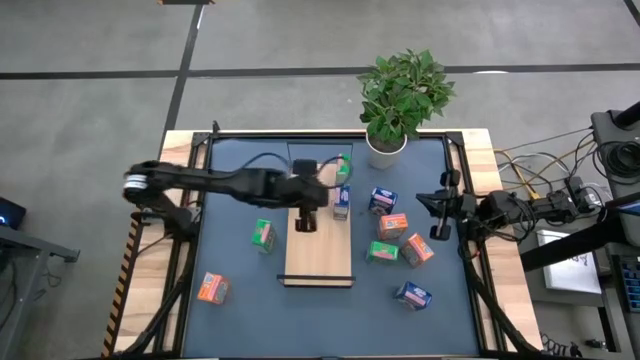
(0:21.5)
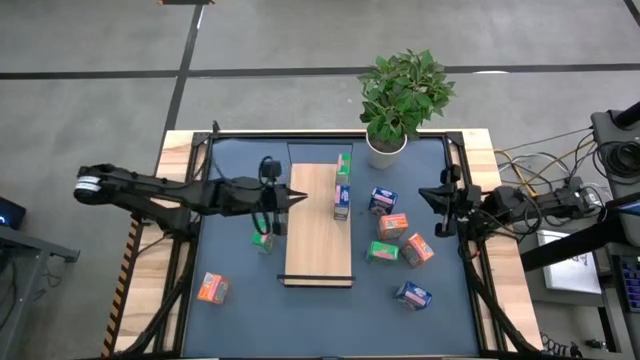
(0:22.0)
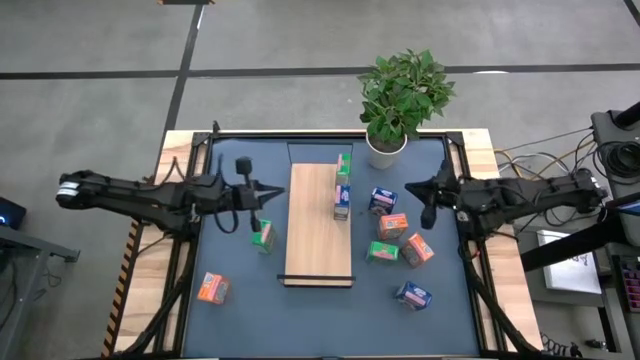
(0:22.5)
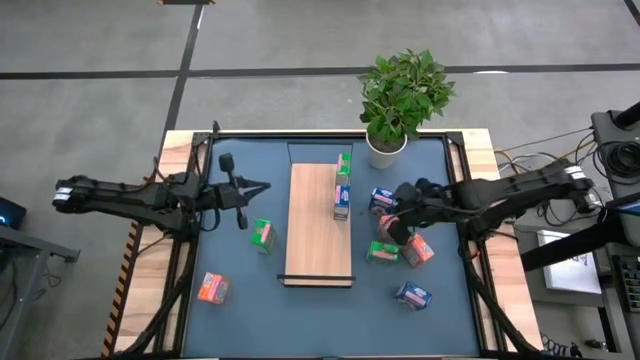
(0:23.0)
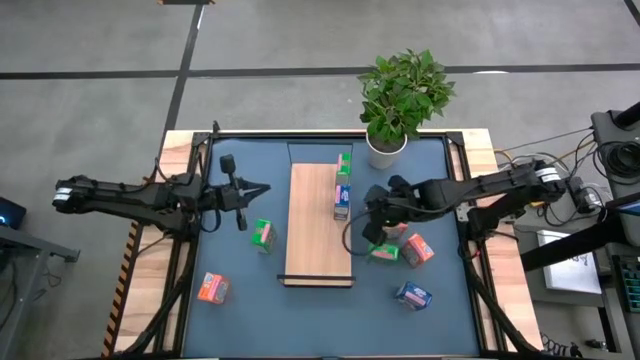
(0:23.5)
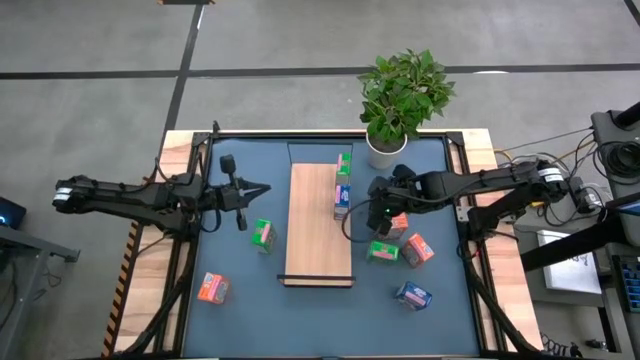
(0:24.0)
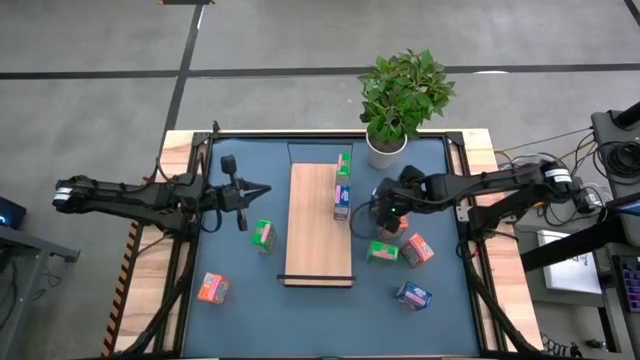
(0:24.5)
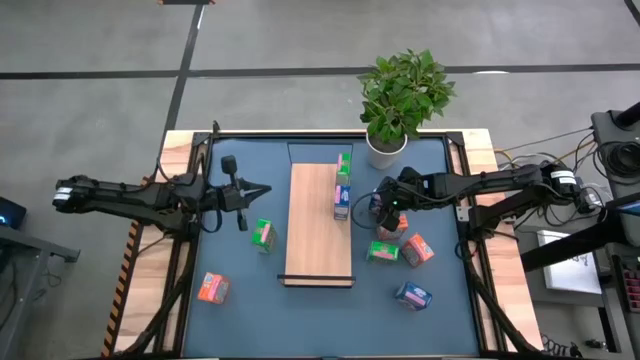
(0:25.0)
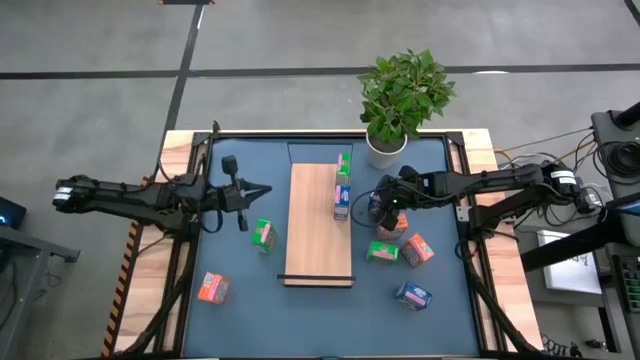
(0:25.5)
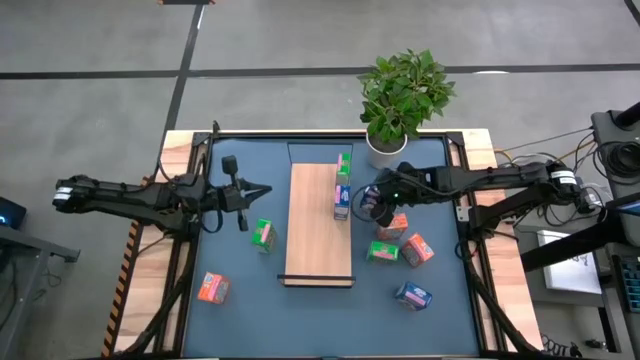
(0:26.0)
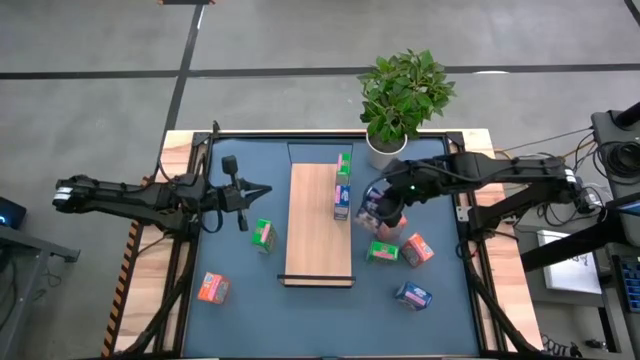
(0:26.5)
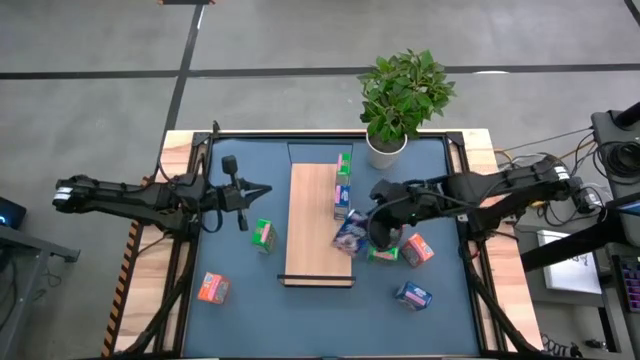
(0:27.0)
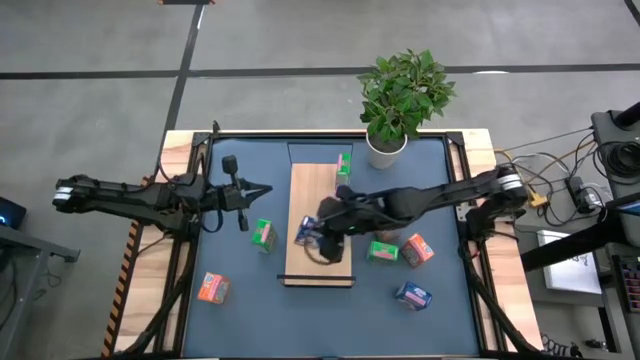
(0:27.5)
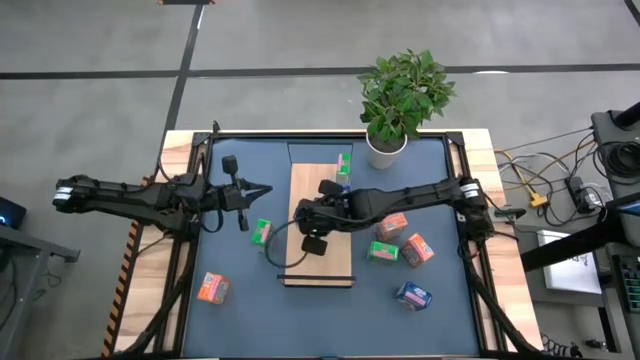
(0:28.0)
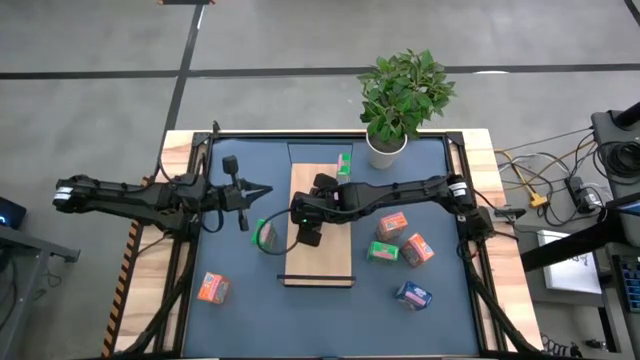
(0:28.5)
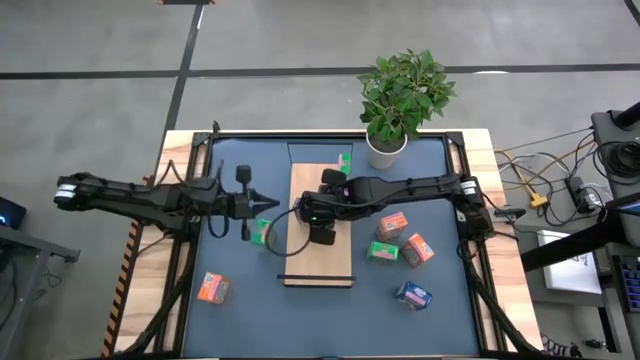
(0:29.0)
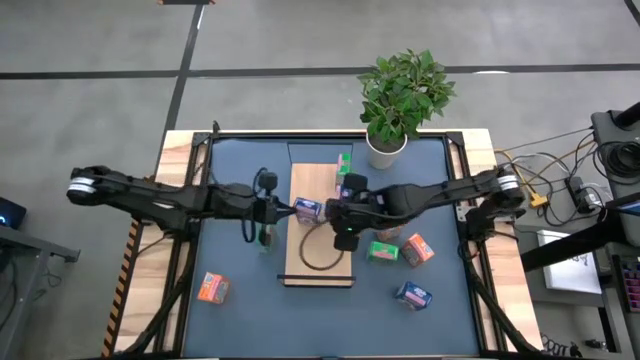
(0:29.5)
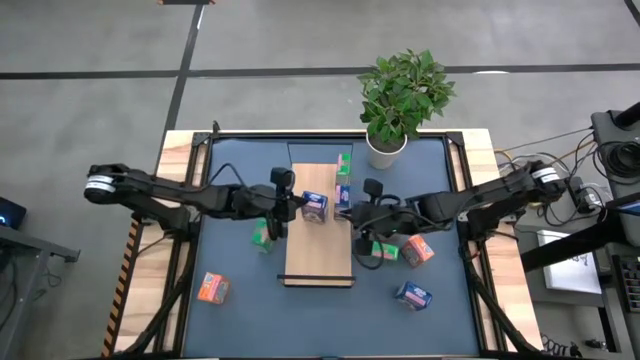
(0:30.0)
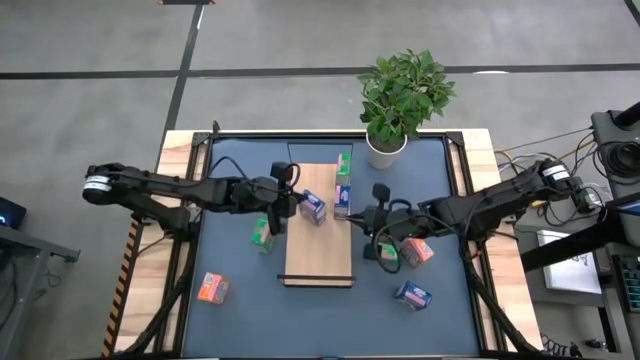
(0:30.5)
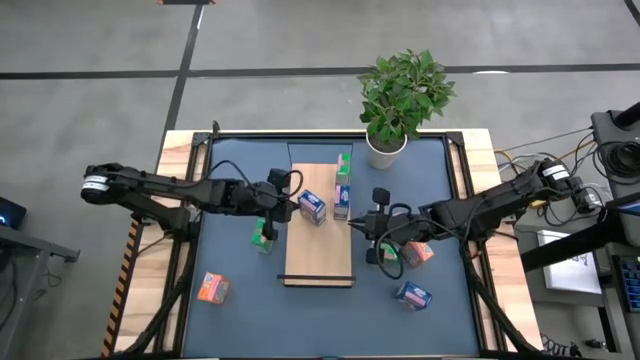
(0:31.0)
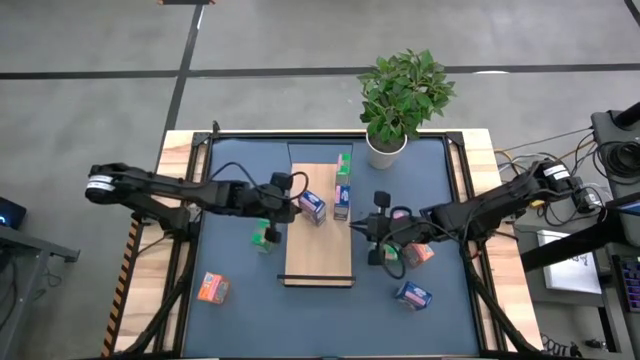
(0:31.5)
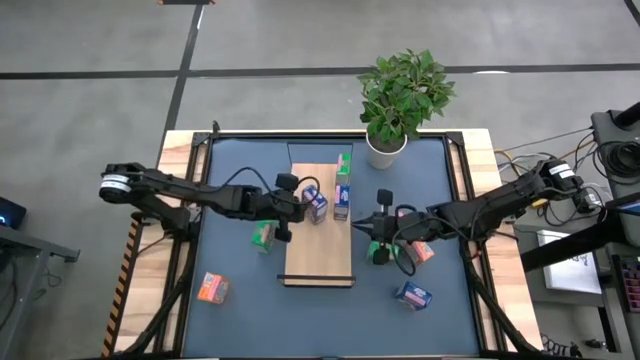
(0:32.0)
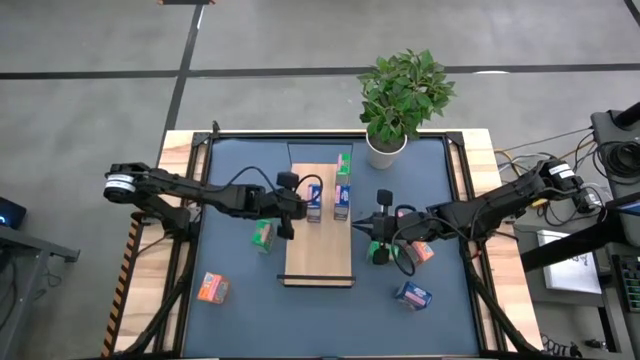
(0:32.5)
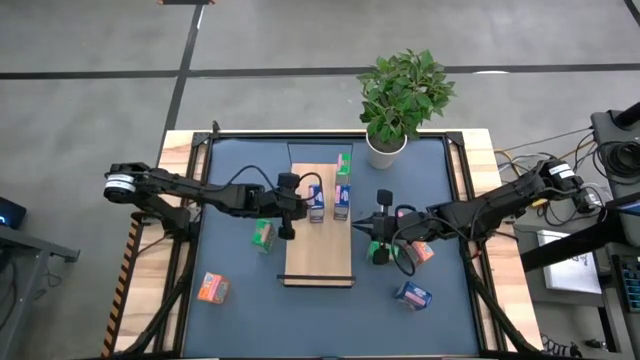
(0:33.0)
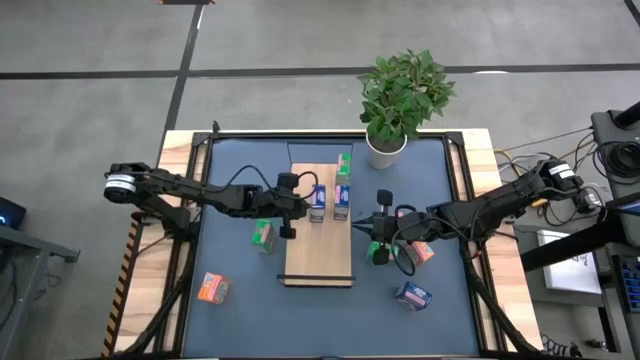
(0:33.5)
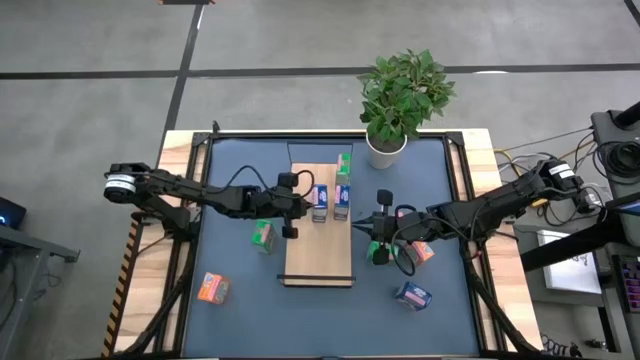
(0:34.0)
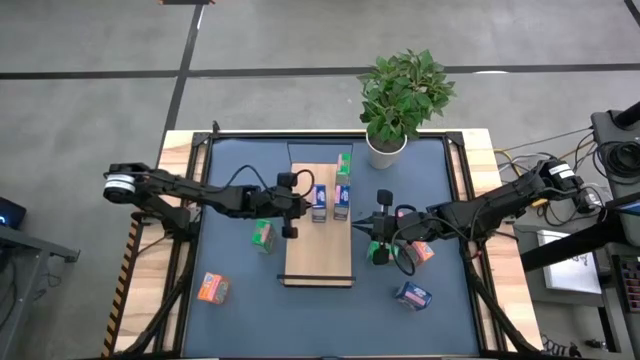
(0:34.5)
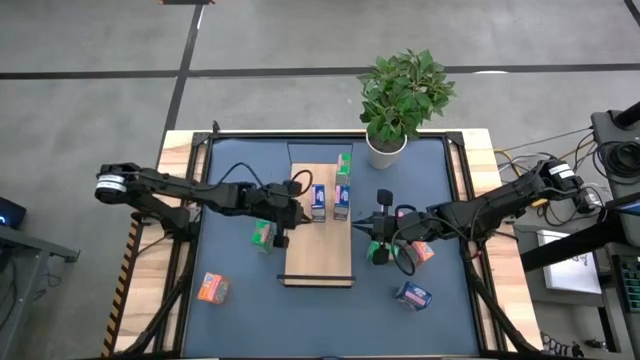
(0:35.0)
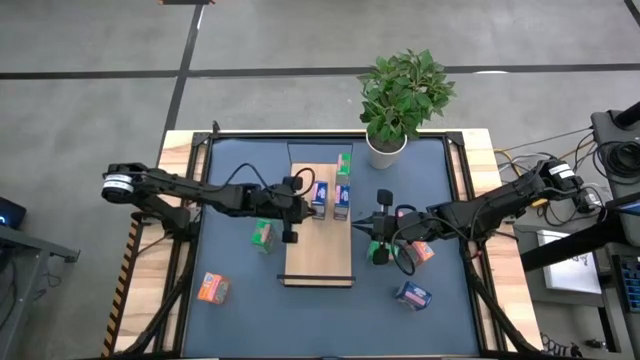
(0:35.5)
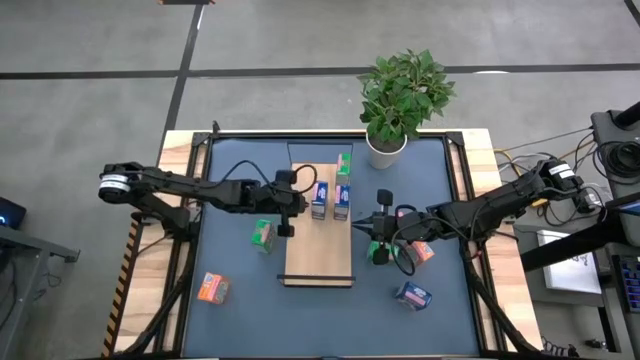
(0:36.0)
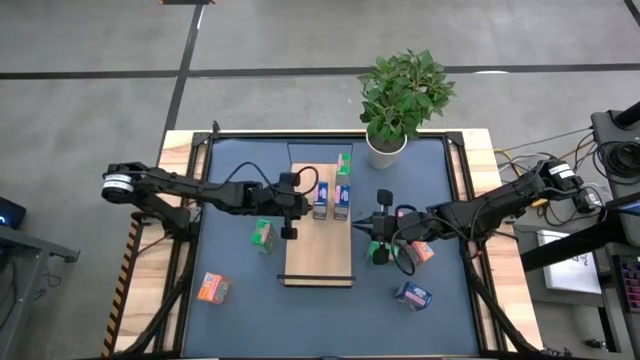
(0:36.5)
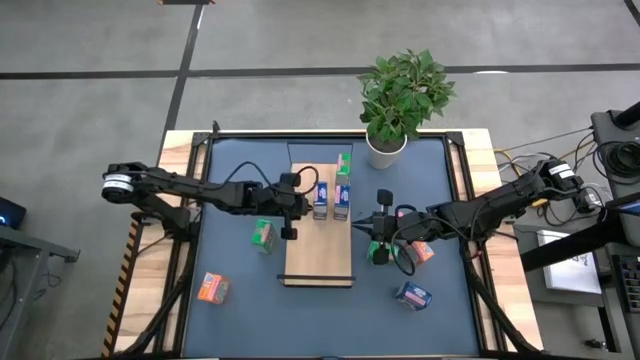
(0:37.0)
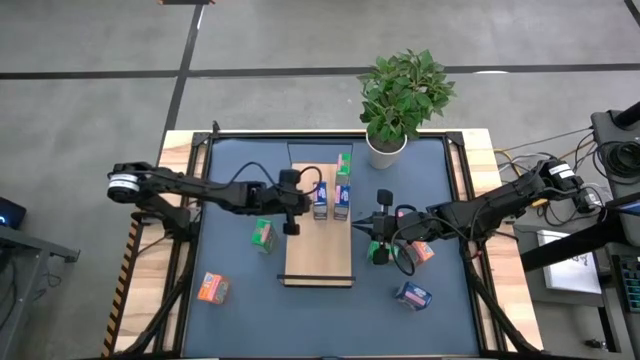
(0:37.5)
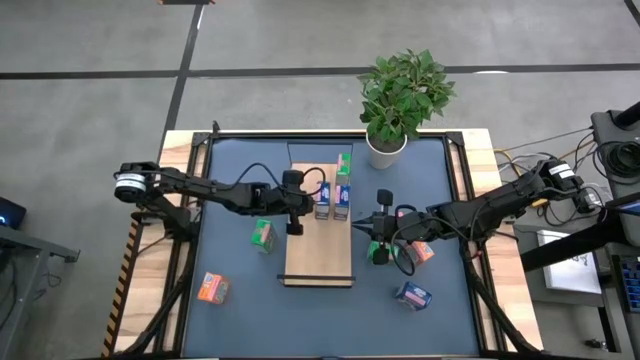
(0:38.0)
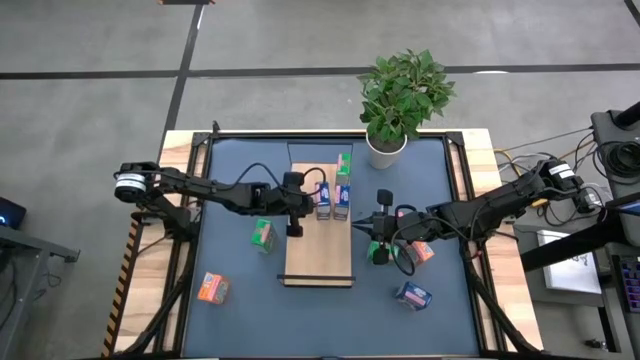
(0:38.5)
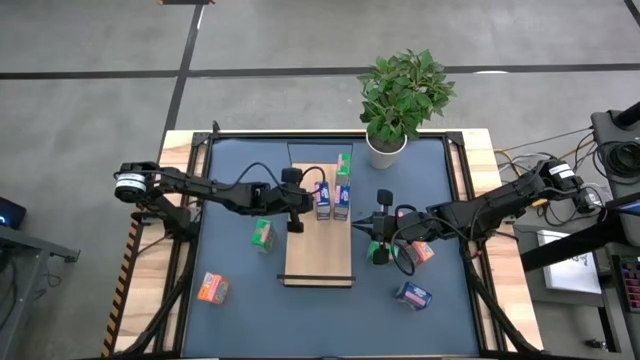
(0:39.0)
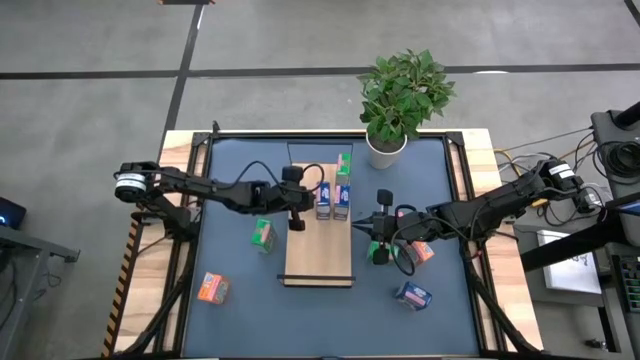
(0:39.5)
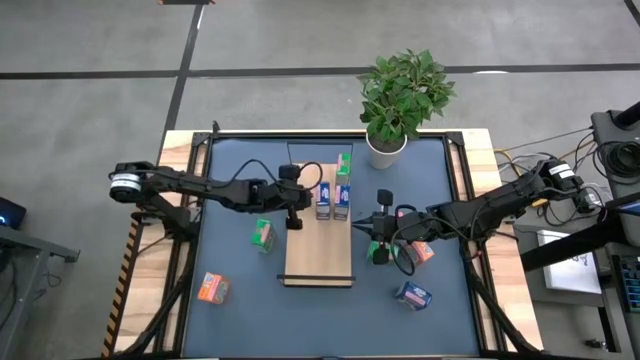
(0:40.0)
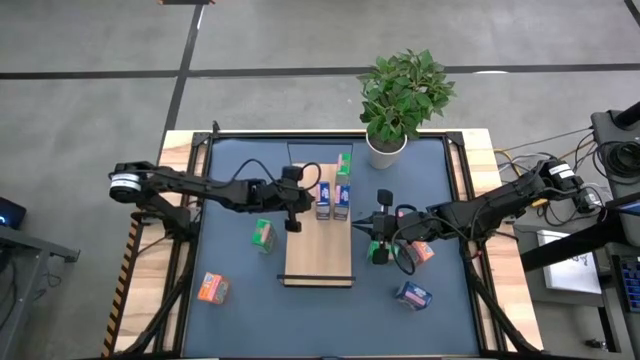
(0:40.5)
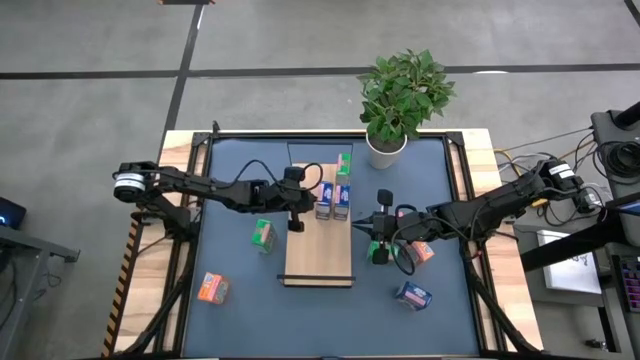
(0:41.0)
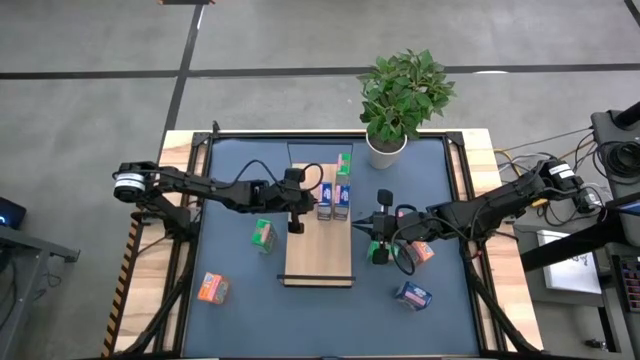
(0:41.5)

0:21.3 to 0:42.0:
Task: Stack cereal on shelf
Put the top blue cereal box on the shelf aligned with the other blue cereal box
